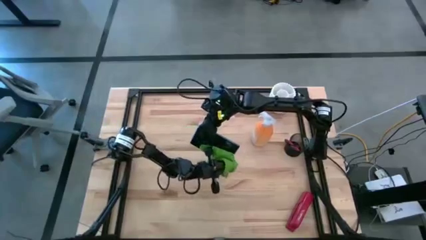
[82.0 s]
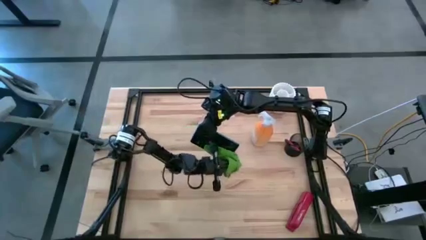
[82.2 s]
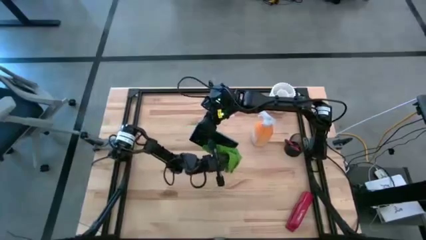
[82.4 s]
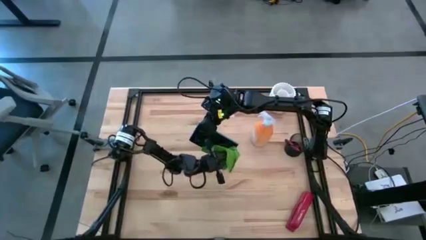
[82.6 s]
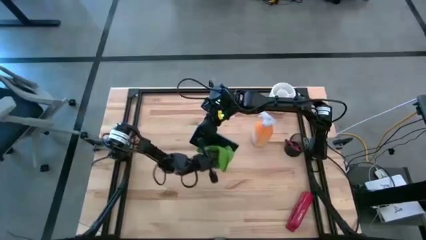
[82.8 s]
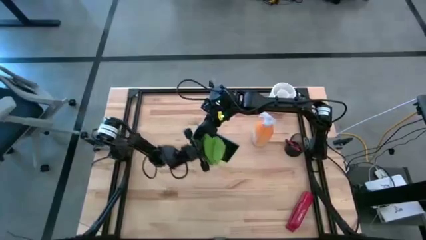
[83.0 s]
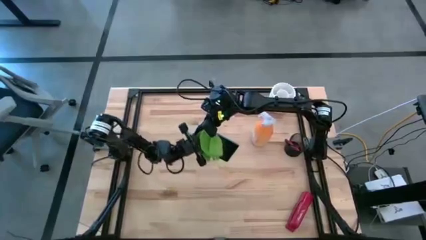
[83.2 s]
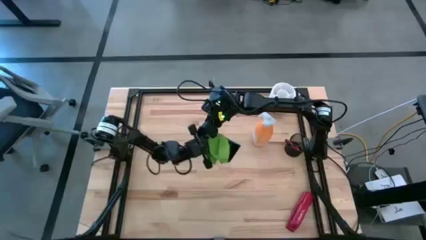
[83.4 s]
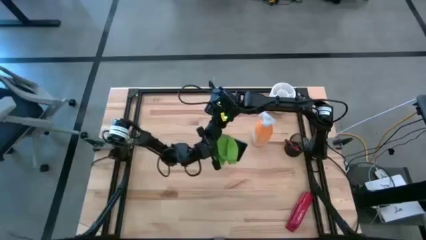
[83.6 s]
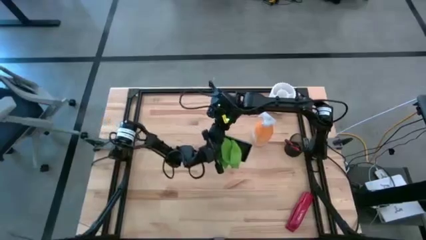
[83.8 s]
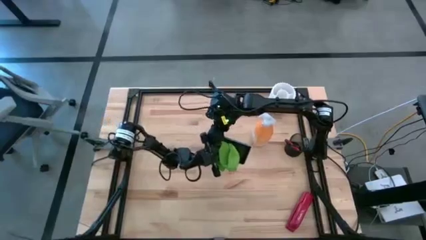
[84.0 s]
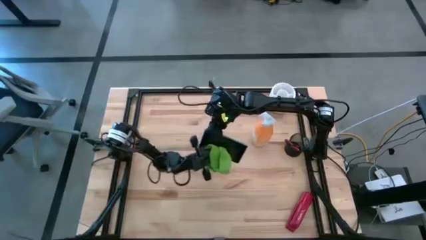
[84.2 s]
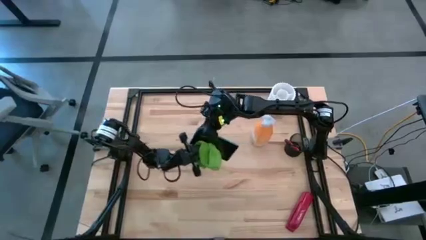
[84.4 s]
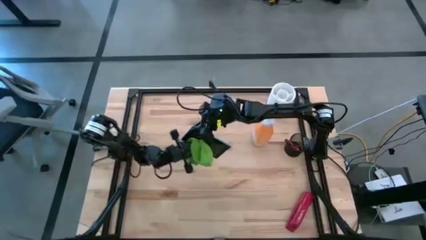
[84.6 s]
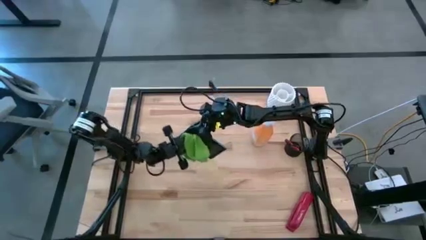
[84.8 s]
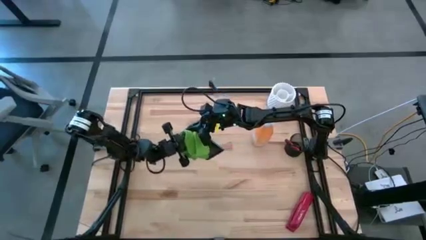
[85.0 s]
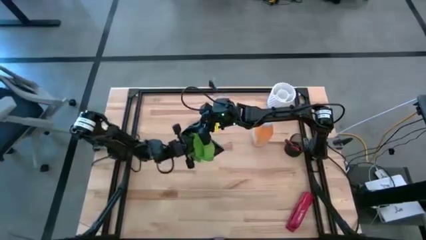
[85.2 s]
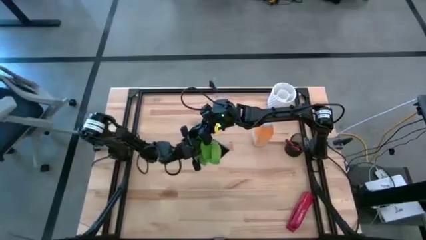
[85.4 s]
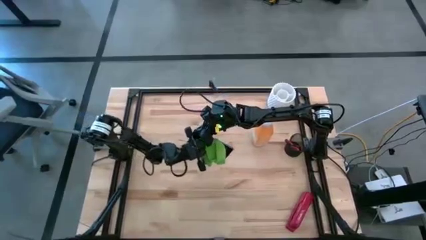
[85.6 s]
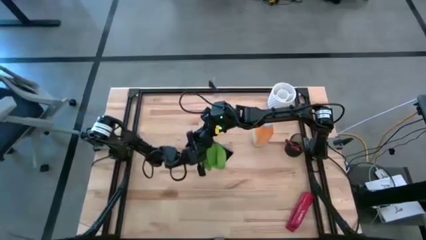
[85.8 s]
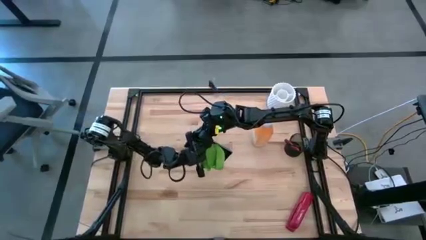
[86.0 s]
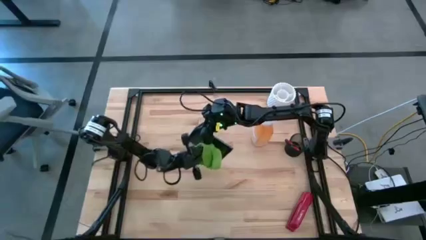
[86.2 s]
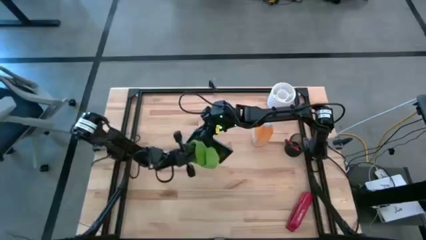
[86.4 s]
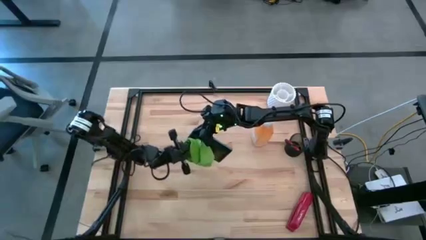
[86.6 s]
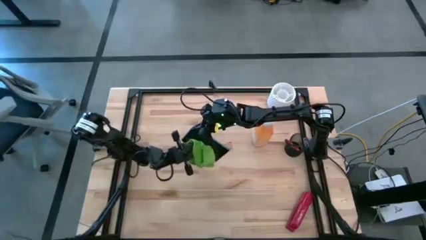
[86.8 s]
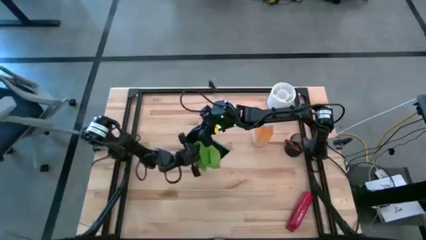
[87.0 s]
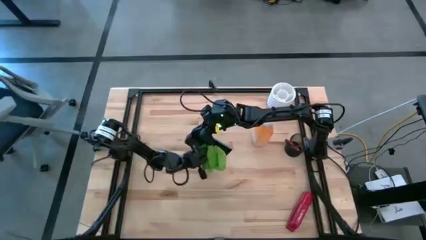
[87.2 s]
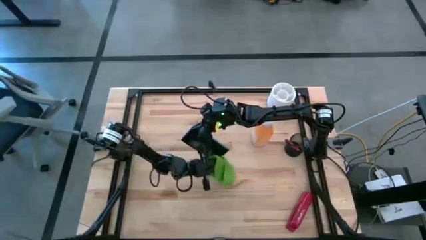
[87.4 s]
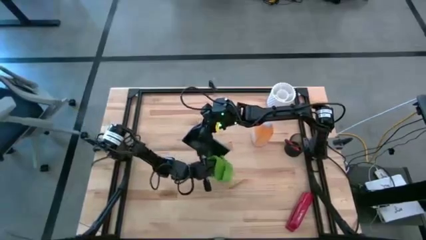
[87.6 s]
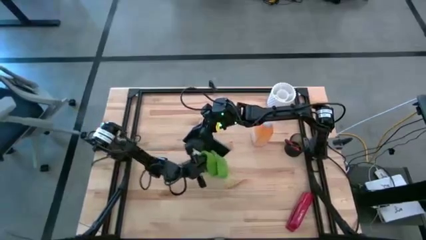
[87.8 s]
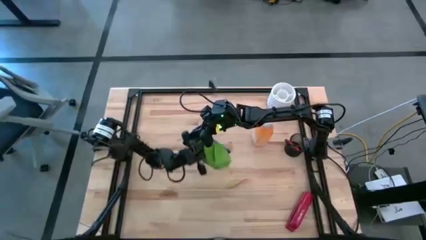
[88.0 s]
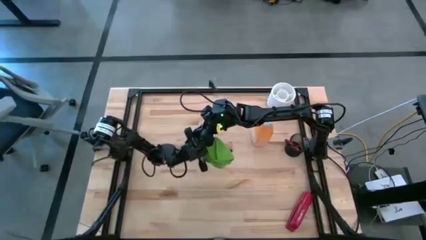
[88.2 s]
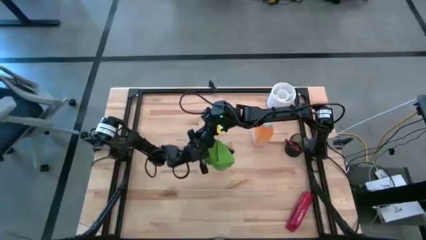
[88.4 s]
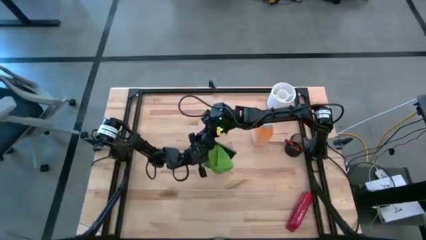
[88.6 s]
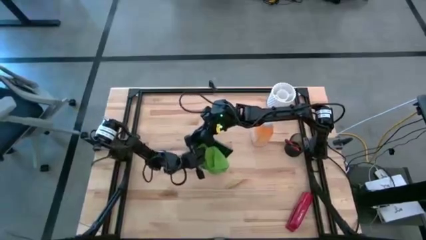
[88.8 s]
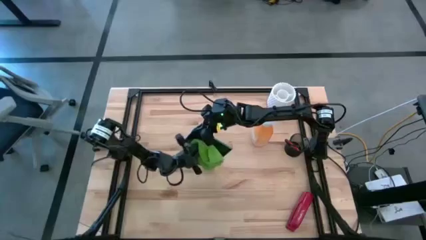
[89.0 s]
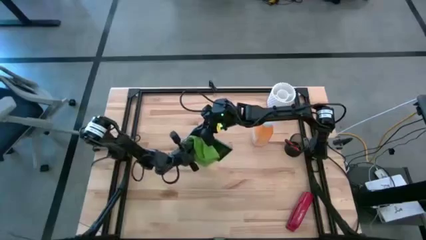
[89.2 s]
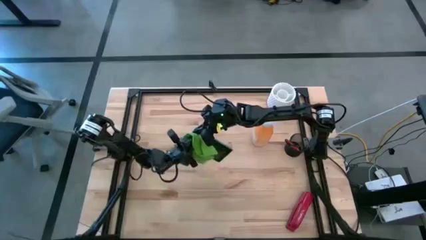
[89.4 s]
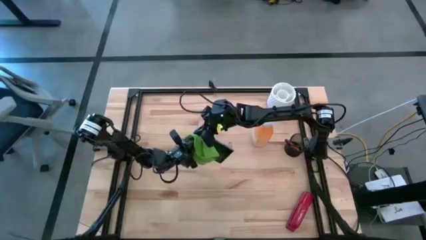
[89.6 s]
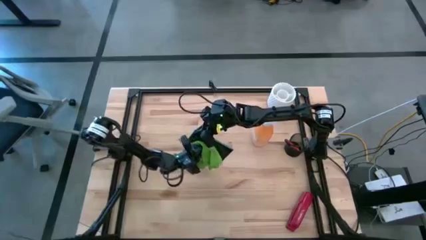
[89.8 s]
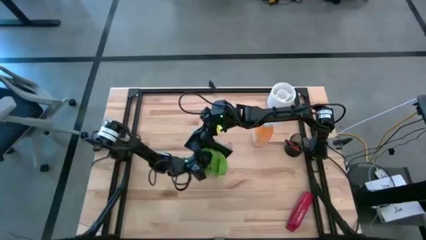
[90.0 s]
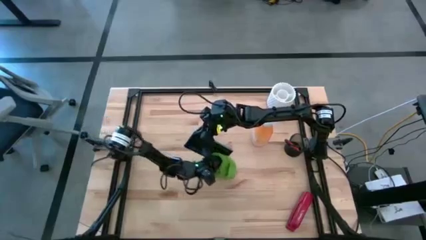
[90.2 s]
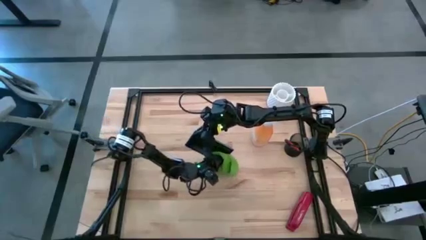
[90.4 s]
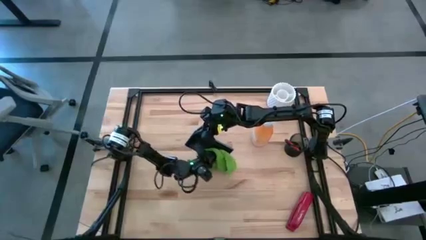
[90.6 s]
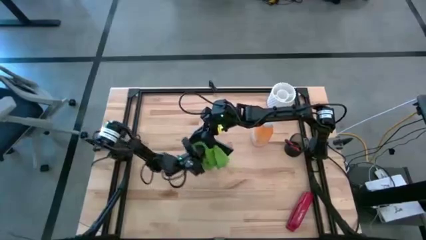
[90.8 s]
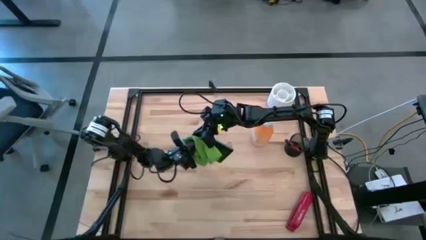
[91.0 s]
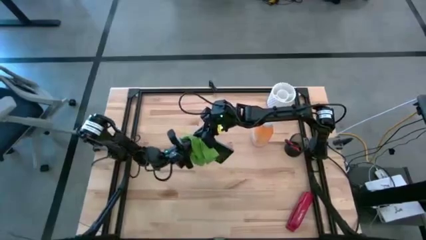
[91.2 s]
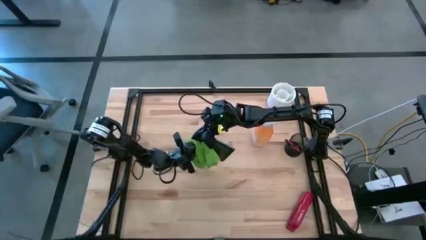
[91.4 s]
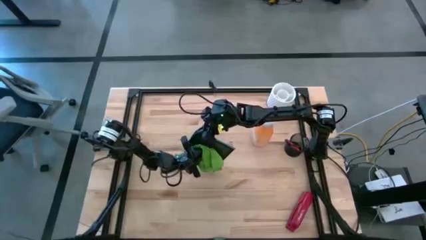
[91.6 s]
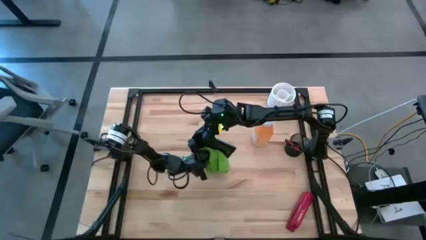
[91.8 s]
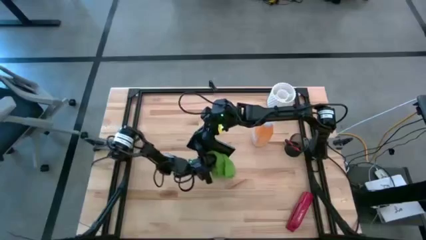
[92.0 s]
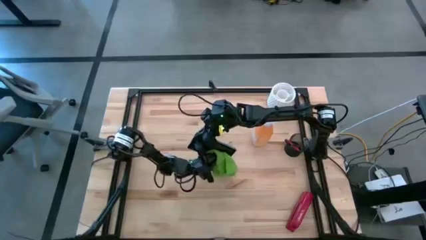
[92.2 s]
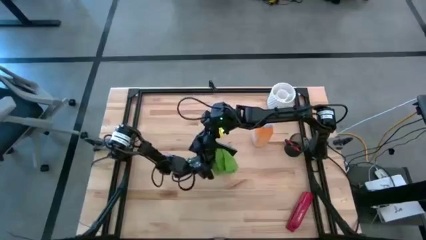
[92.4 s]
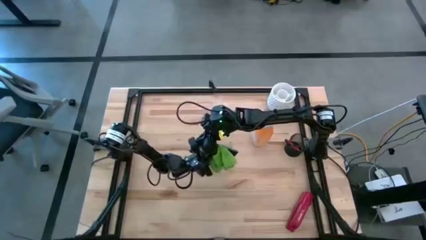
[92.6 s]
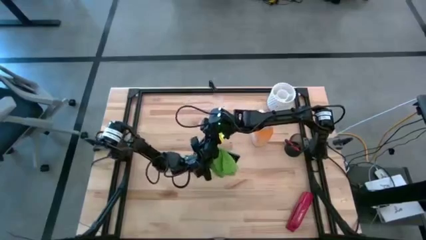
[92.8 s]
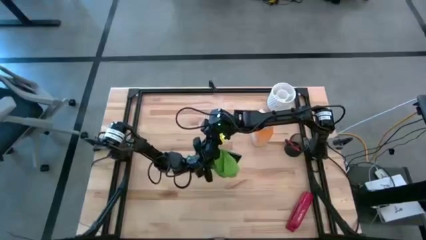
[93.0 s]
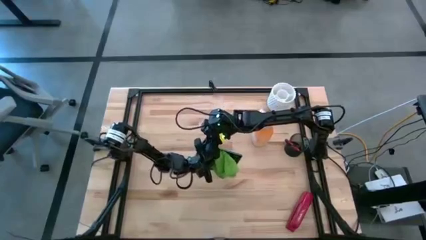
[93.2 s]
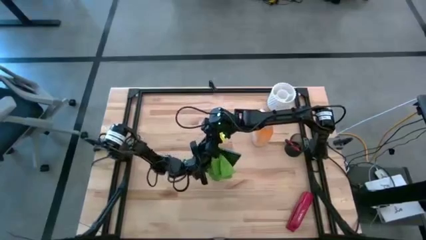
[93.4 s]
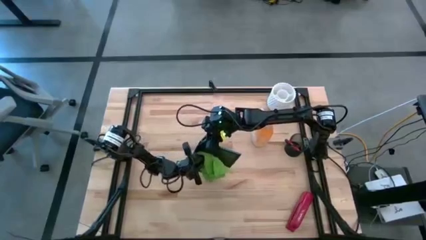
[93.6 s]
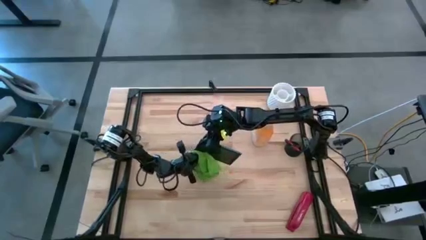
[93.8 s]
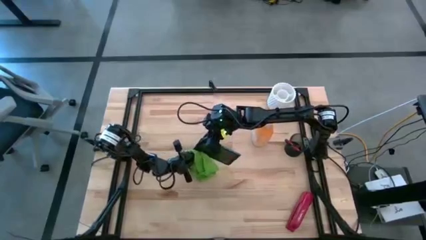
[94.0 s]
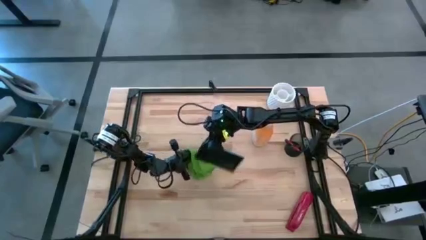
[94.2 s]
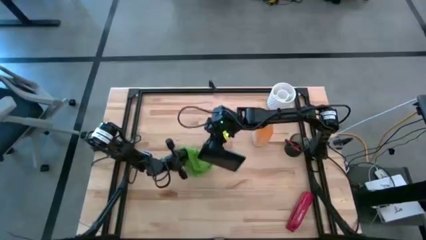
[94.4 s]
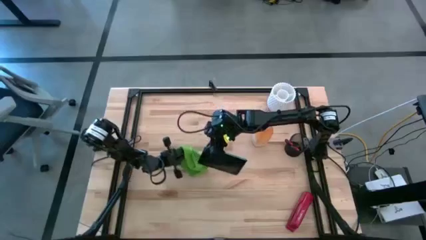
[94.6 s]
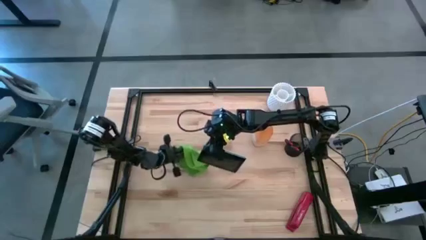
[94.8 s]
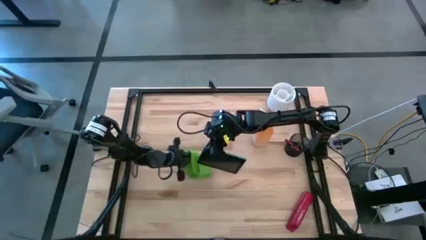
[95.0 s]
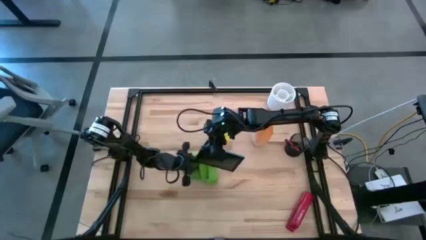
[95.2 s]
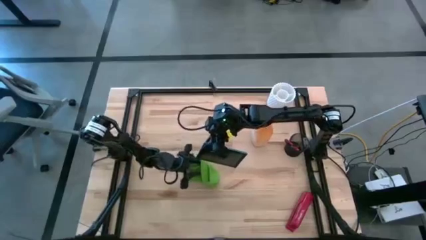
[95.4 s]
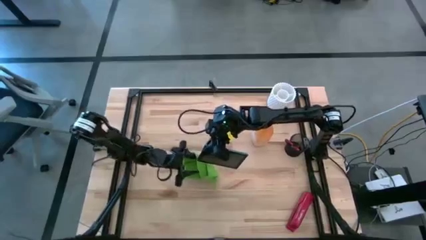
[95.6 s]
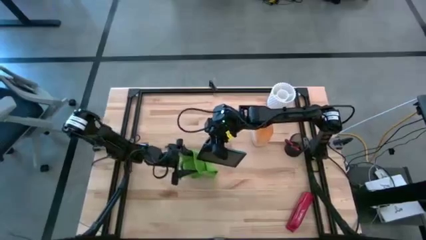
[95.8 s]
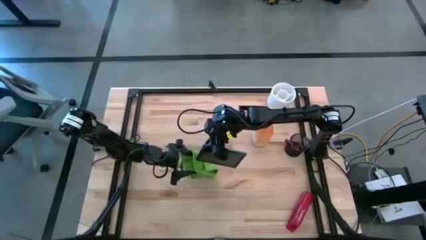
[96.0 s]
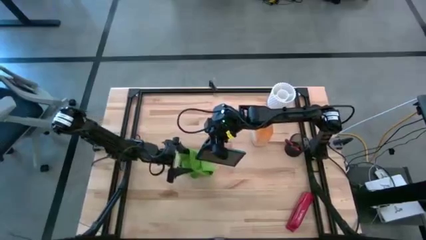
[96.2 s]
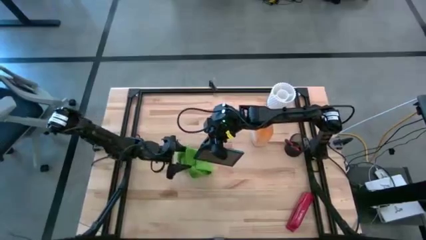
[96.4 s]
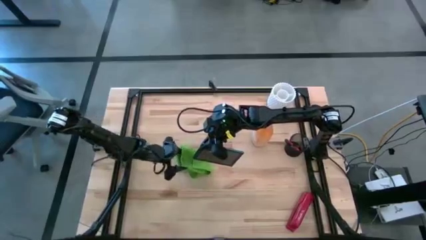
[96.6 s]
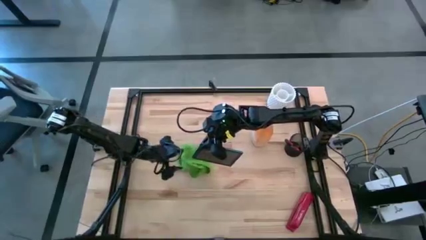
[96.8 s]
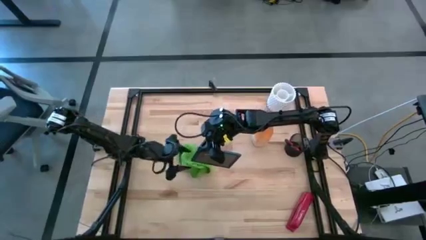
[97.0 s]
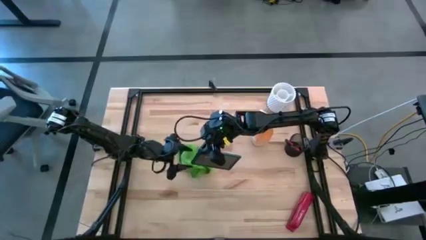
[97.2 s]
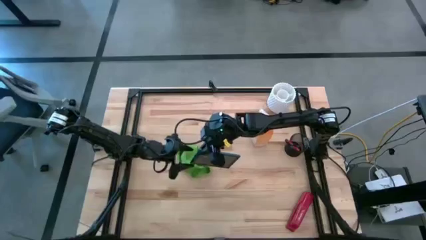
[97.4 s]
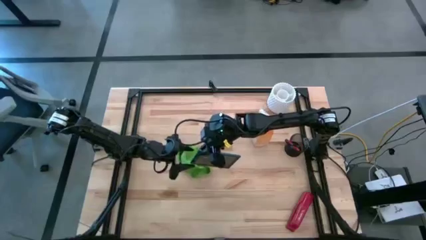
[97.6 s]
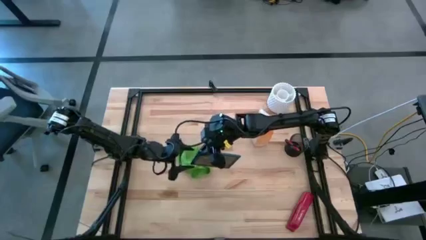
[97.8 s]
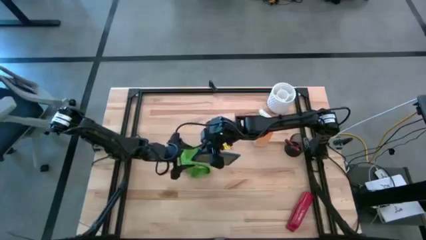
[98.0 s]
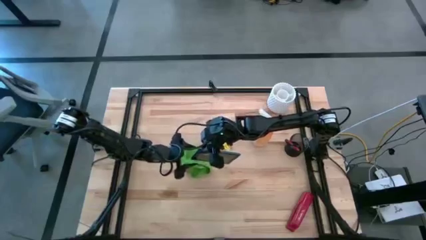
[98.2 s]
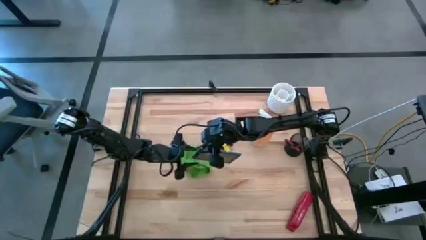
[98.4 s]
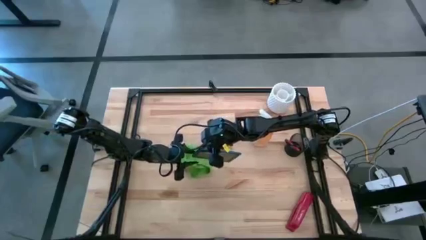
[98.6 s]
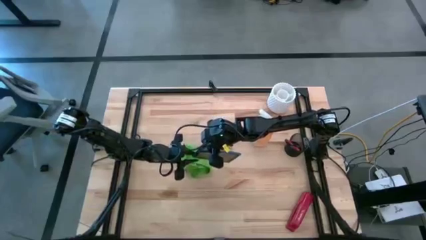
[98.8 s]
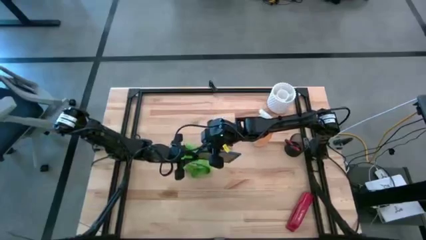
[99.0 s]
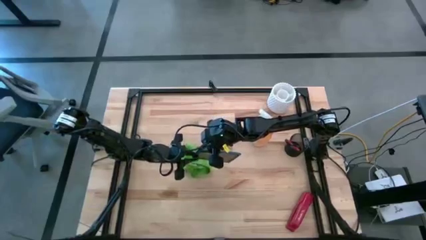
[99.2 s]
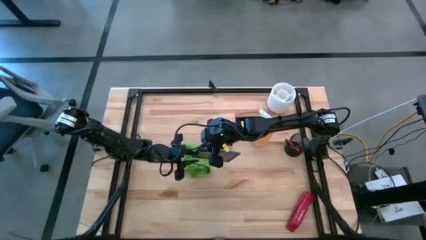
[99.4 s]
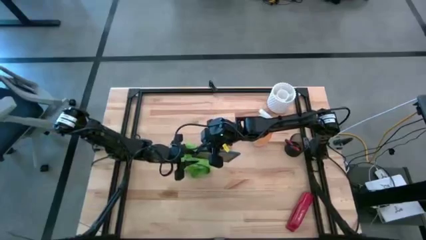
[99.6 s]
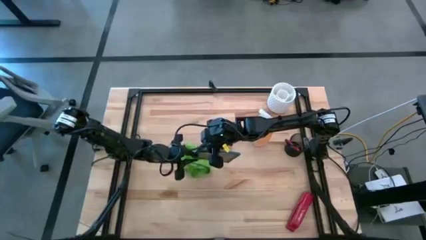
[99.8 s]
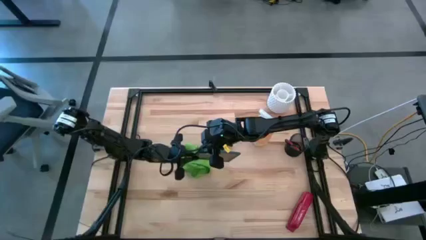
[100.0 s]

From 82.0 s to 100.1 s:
Task: Apply microfiber cloth
Wipe the back and front of the tablet with the green microfiber cloth
